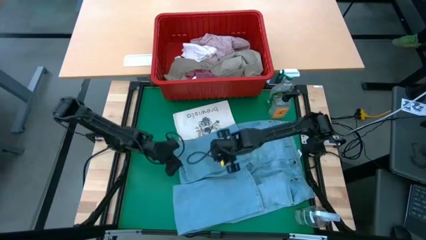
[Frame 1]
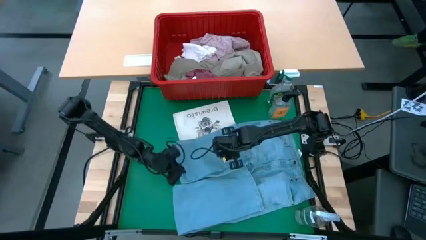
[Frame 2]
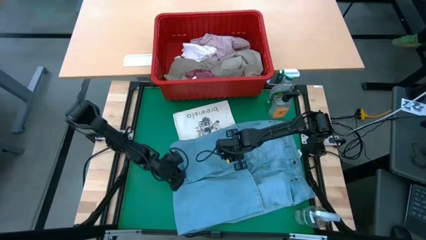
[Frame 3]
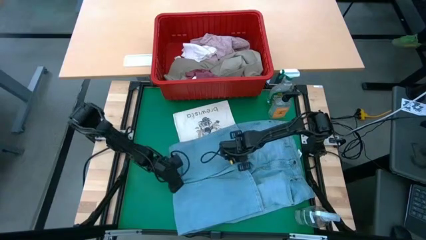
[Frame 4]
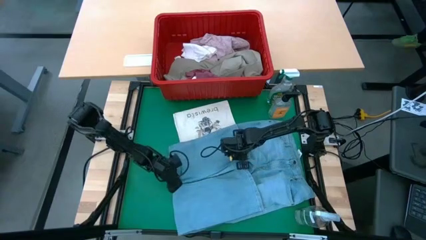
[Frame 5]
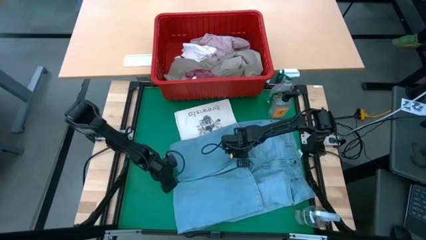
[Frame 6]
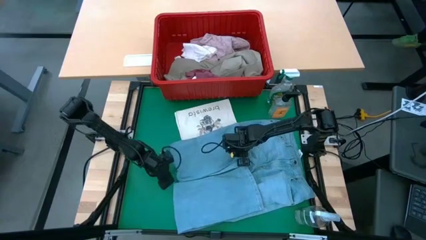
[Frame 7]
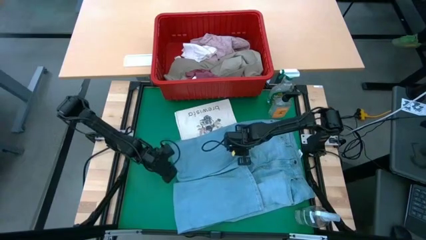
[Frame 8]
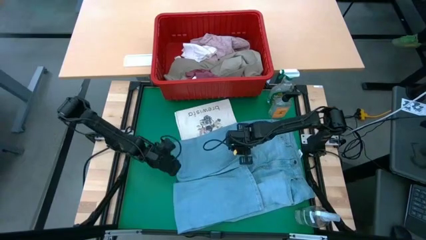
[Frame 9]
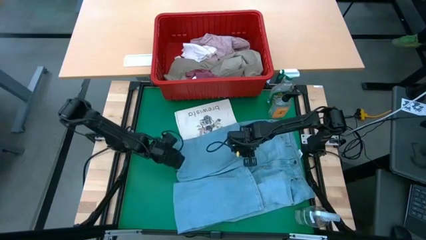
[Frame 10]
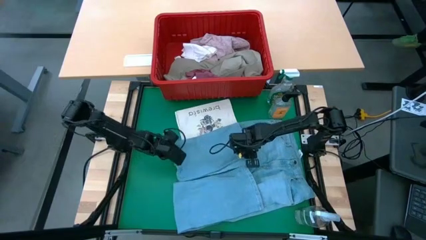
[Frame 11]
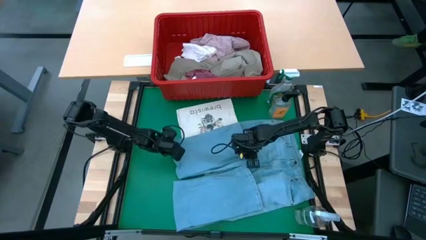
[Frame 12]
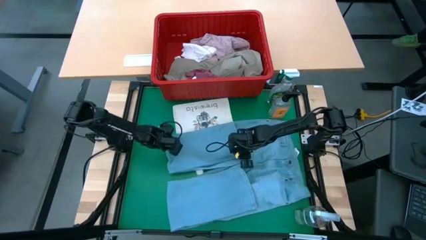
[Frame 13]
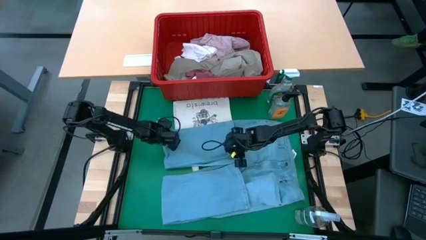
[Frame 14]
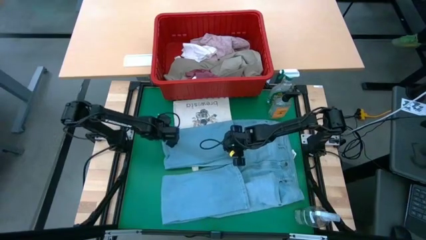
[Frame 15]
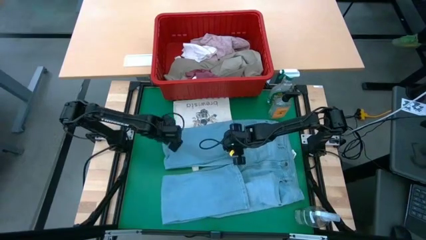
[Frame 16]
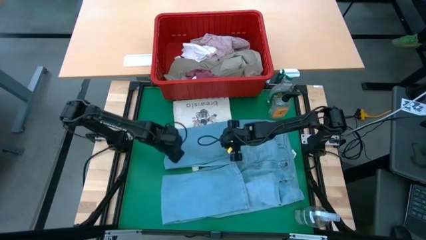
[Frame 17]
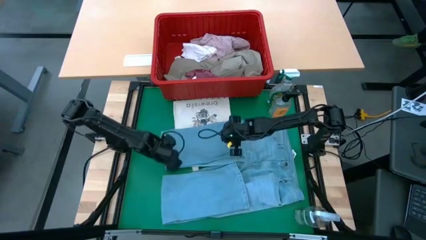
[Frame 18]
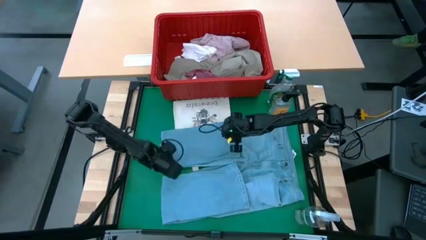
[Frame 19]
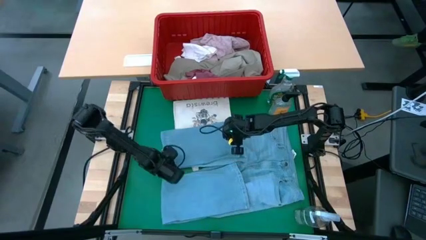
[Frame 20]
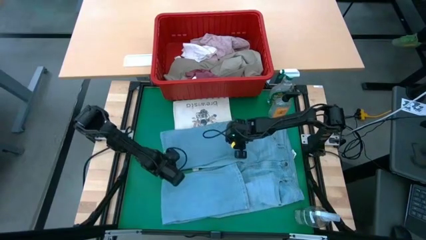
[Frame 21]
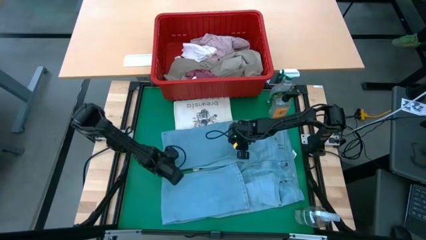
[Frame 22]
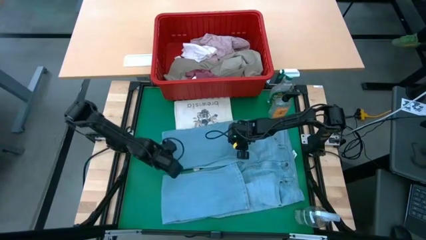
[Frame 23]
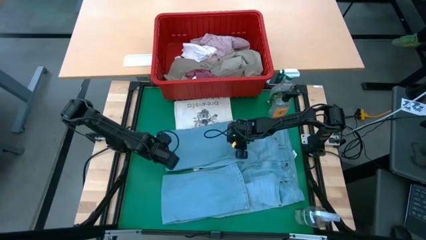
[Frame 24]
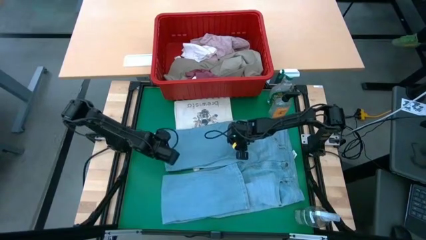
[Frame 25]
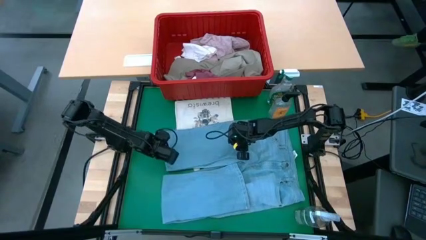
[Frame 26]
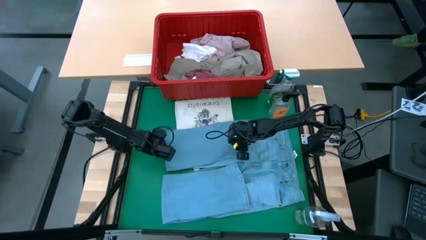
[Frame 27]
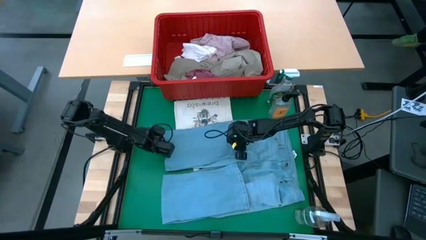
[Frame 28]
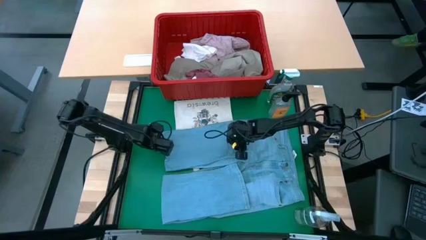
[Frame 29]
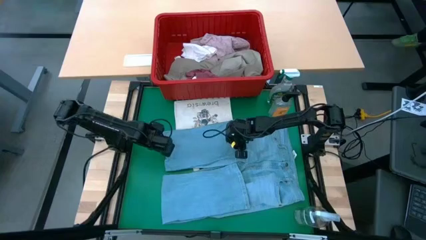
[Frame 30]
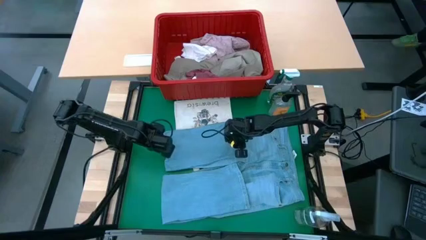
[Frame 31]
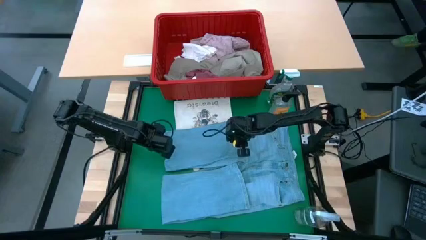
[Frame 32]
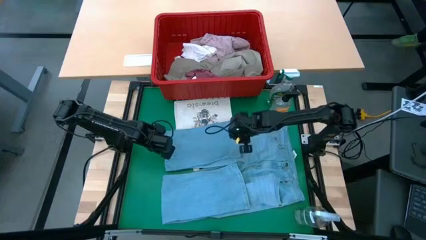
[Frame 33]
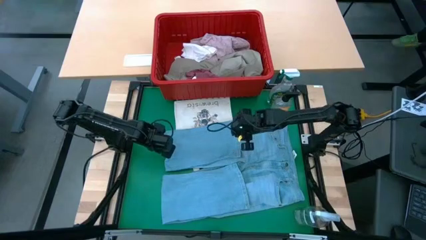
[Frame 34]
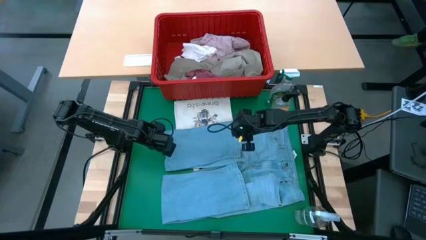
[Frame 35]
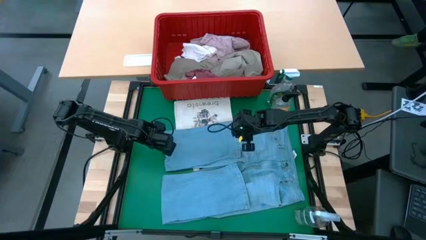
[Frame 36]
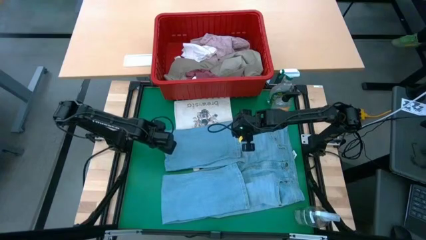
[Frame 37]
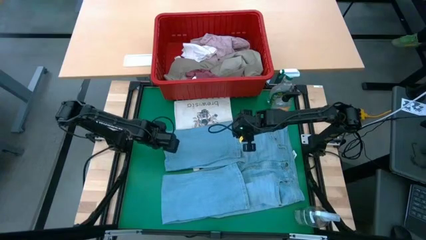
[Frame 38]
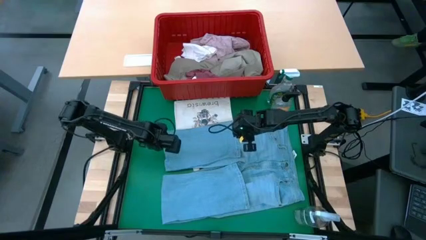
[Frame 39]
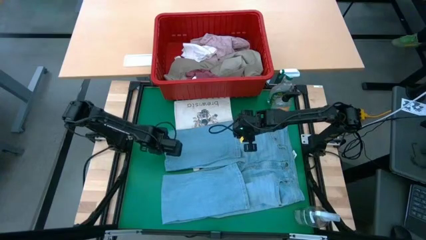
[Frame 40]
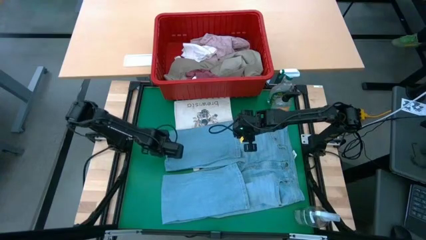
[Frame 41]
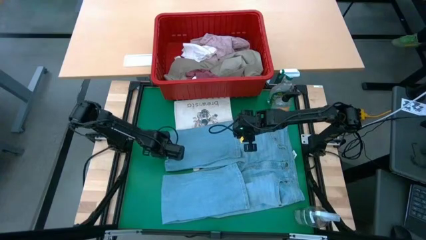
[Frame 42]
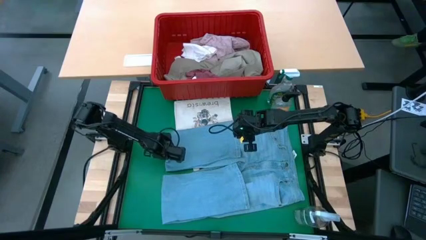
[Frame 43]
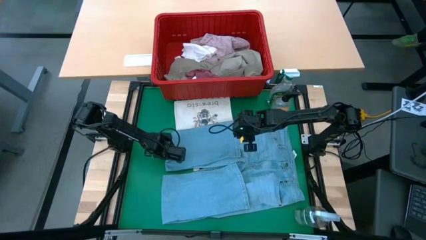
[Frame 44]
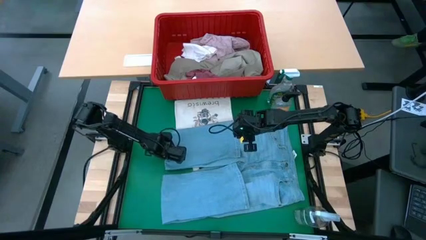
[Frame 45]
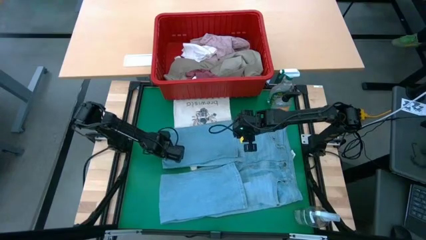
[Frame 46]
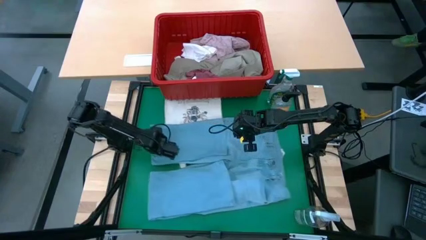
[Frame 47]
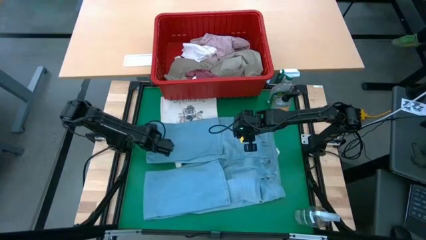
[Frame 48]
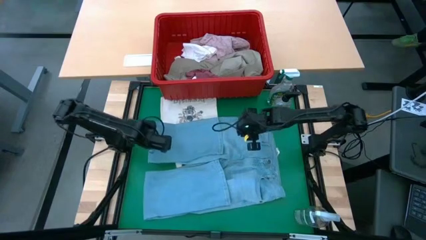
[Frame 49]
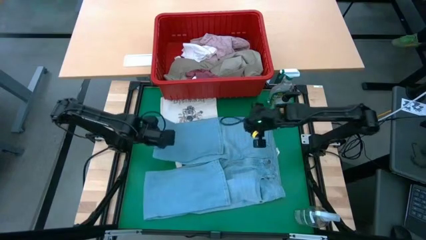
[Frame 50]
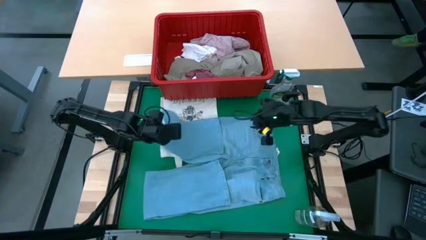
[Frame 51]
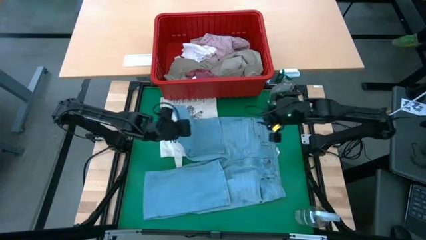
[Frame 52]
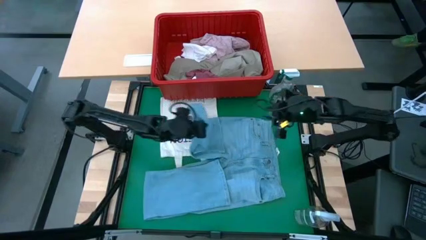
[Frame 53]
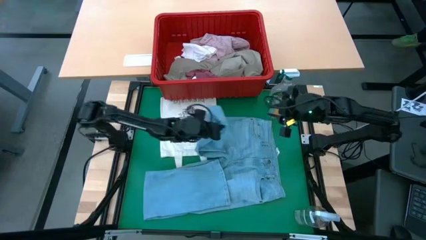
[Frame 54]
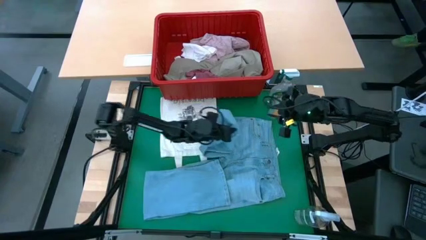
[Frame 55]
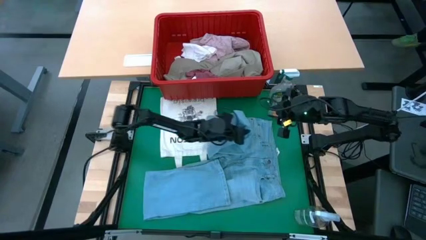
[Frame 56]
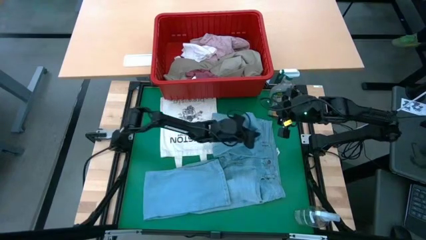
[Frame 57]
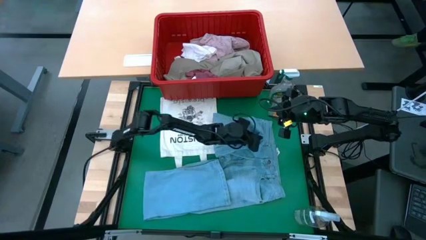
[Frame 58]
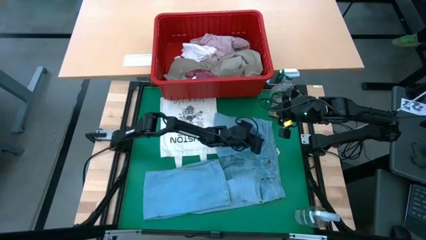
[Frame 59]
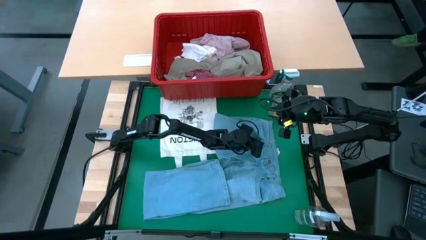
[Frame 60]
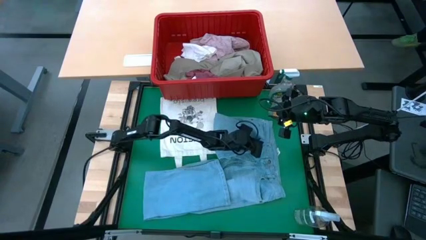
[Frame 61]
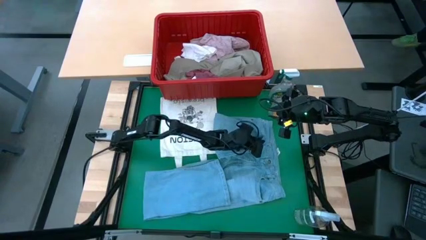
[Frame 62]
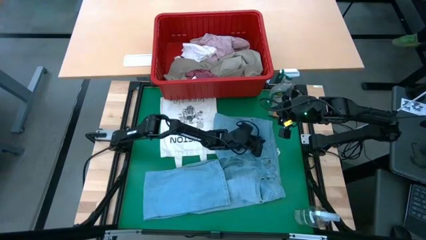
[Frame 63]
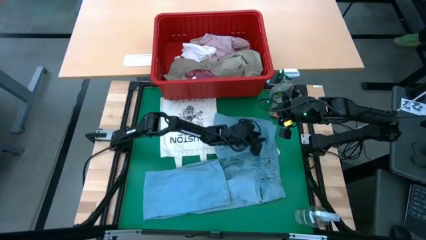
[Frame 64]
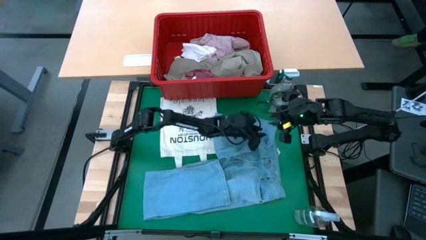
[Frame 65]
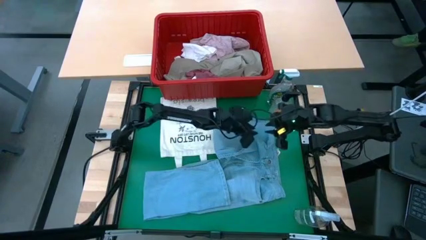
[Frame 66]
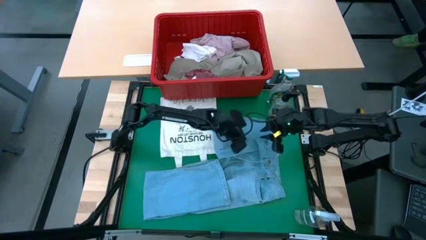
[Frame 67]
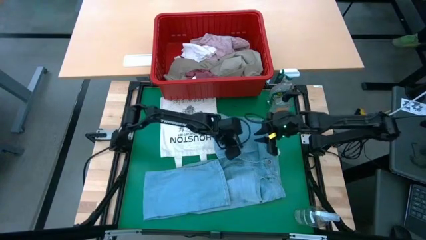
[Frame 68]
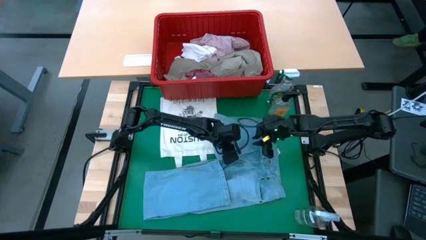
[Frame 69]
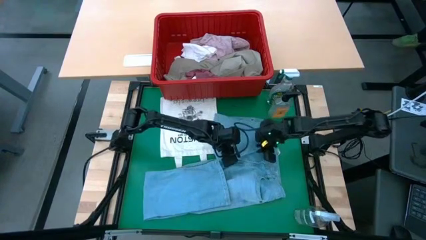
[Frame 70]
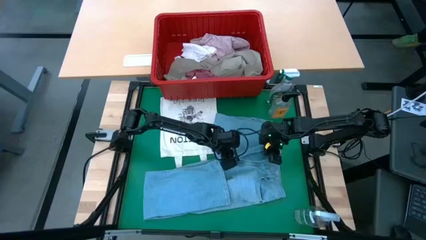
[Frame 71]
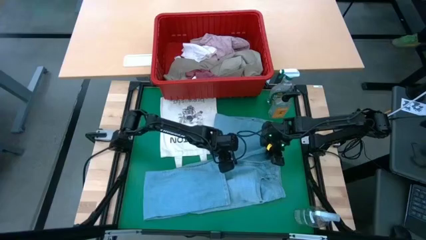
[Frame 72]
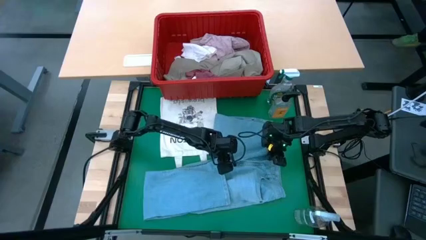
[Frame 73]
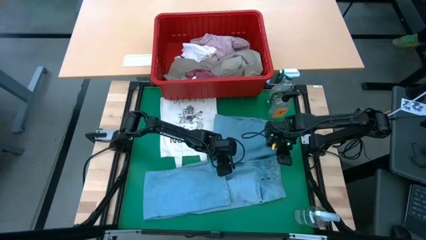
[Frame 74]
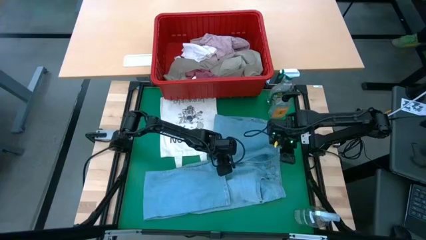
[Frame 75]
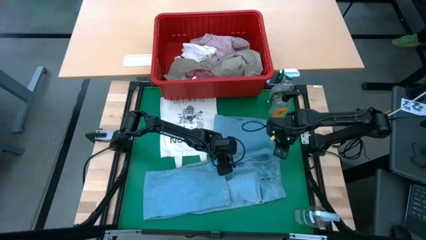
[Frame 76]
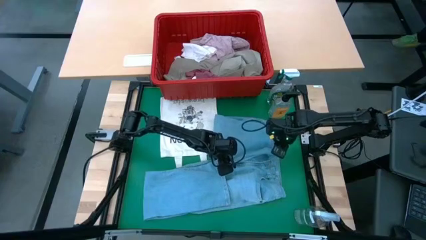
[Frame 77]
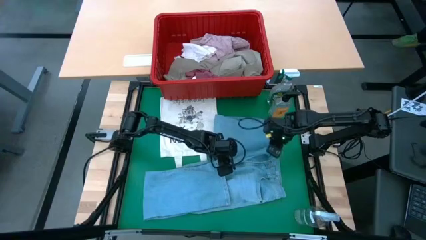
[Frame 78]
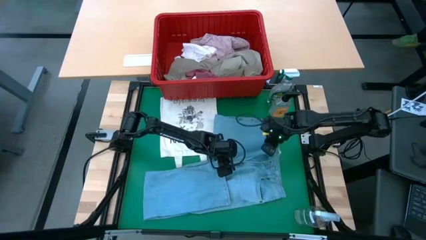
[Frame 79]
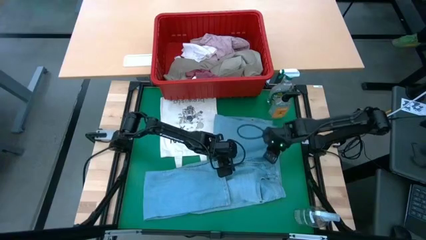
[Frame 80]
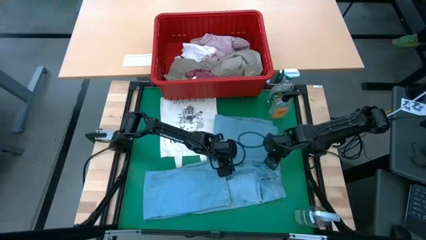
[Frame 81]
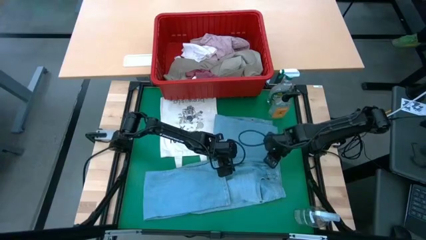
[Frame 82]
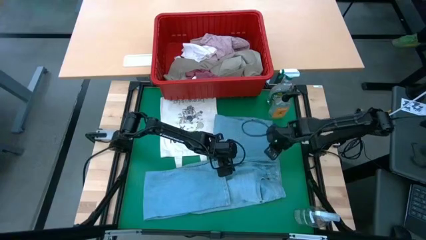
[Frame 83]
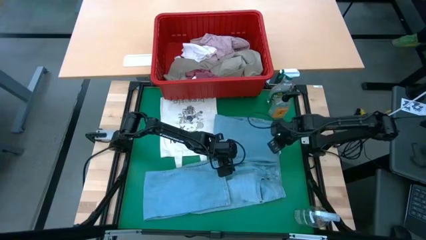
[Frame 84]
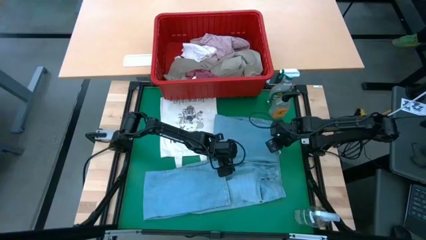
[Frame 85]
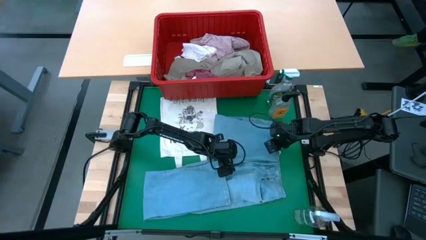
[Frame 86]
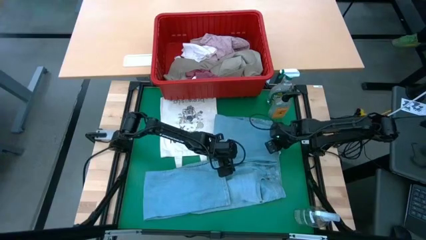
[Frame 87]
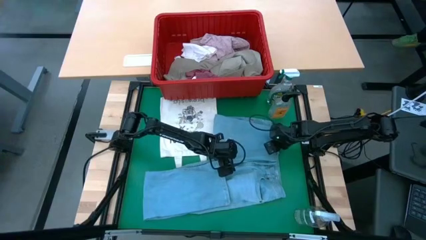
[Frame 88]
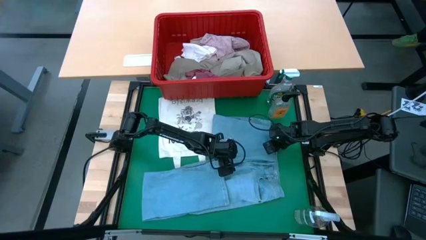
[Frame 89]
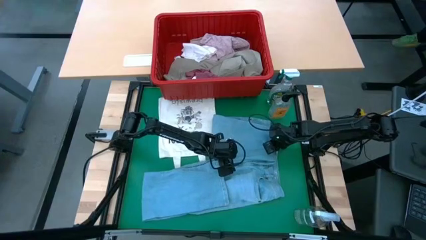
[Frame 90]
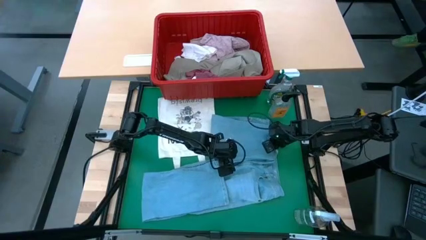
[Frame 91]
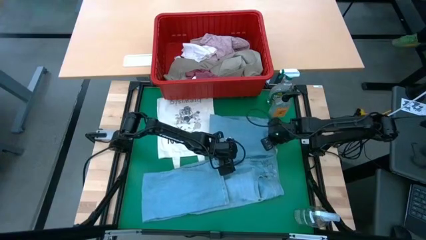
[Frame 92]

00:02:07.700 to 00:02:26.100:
Task: Fold laundry
Fold the light blue pants
